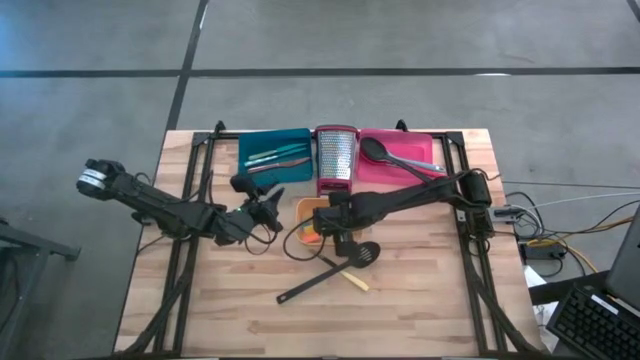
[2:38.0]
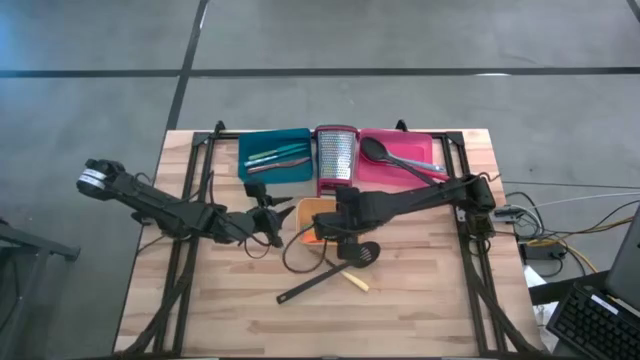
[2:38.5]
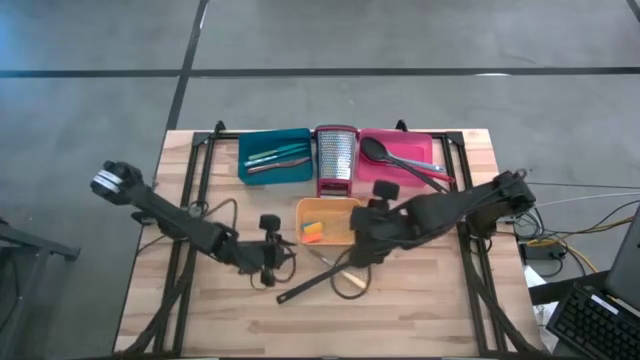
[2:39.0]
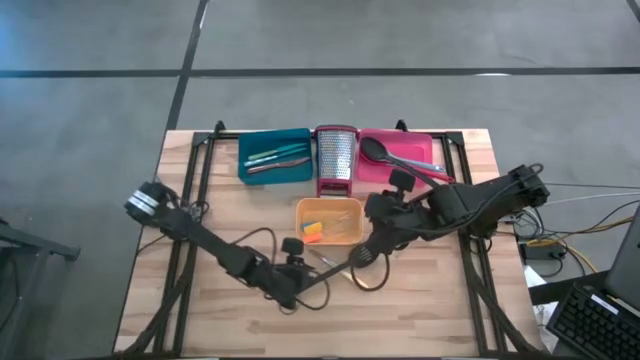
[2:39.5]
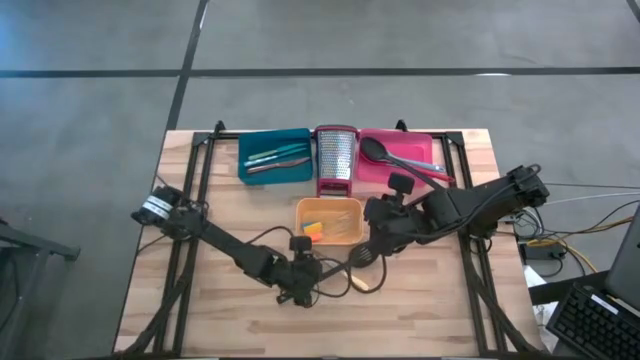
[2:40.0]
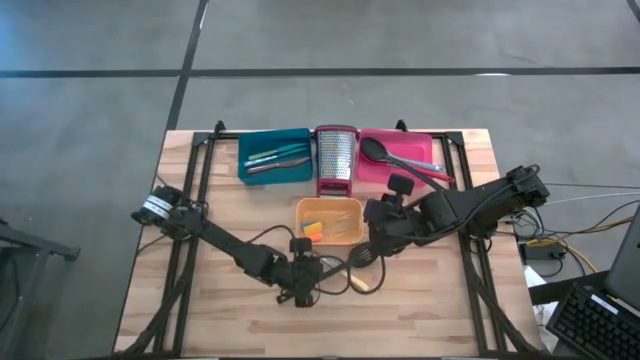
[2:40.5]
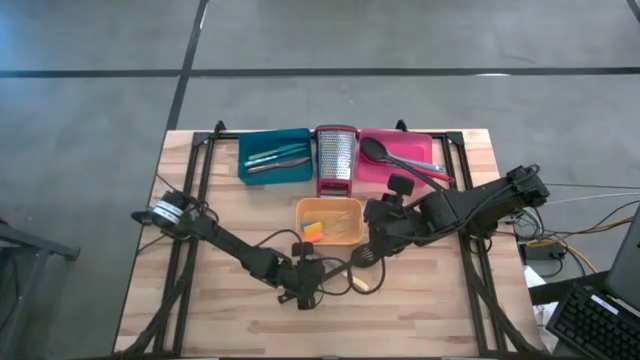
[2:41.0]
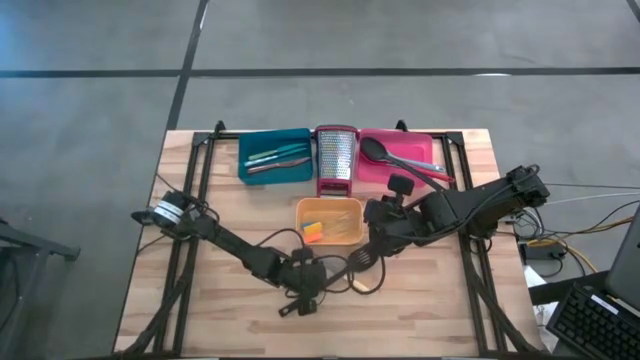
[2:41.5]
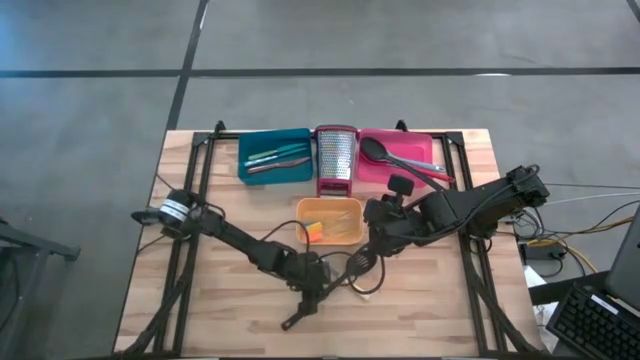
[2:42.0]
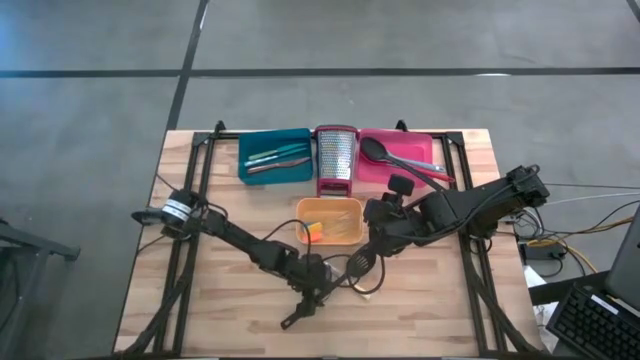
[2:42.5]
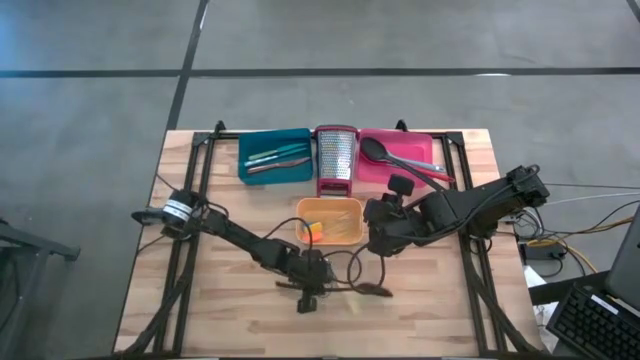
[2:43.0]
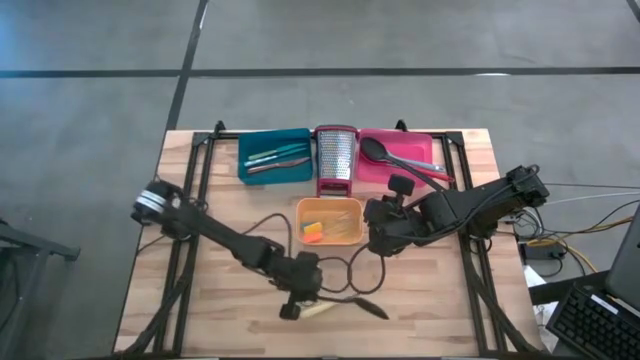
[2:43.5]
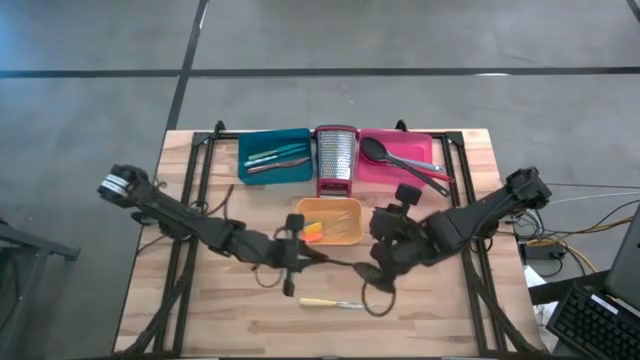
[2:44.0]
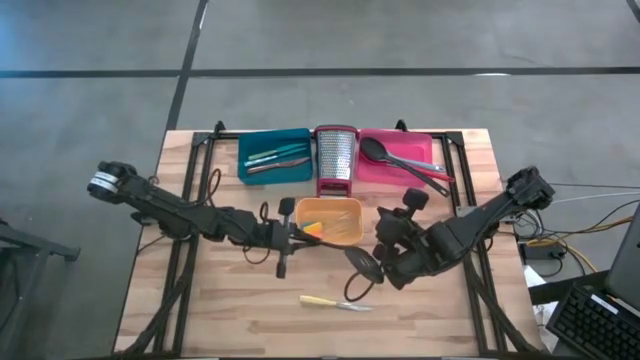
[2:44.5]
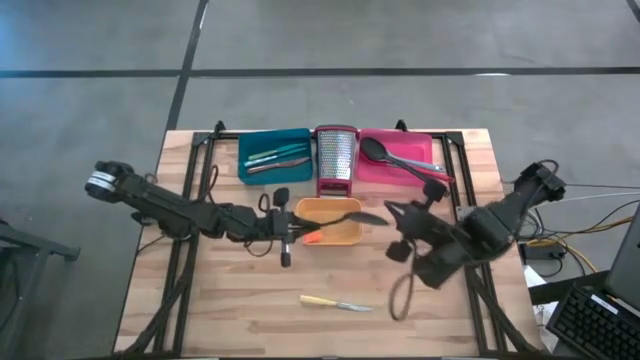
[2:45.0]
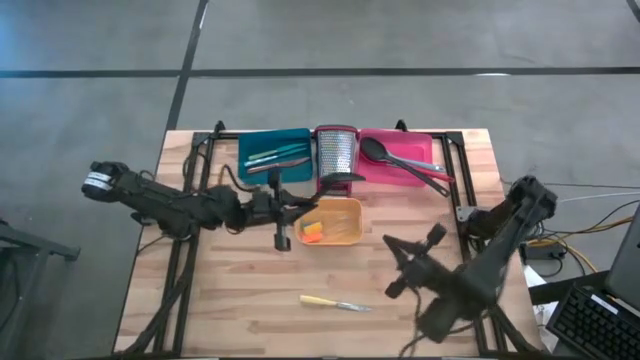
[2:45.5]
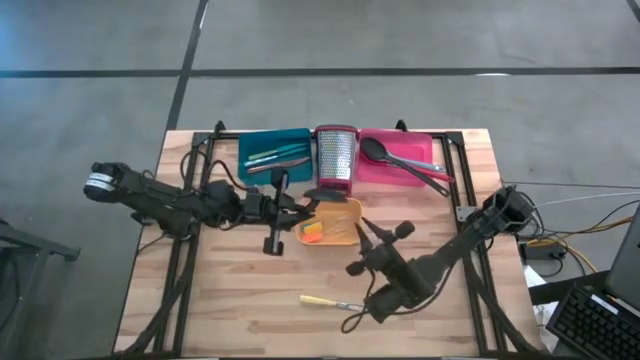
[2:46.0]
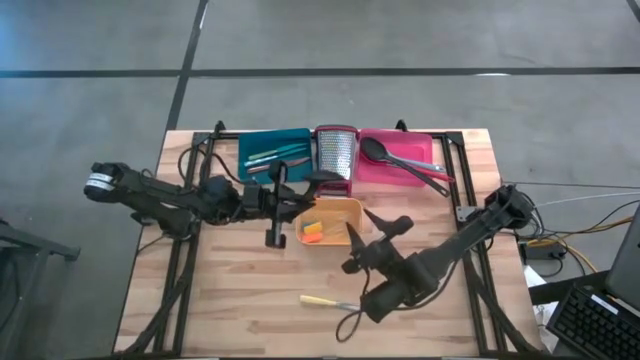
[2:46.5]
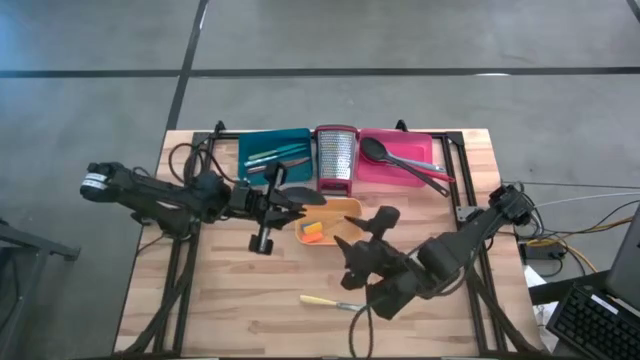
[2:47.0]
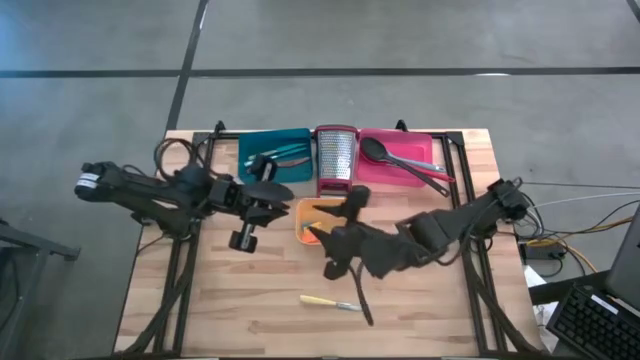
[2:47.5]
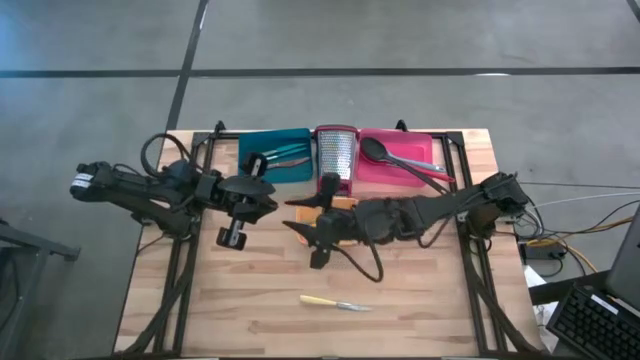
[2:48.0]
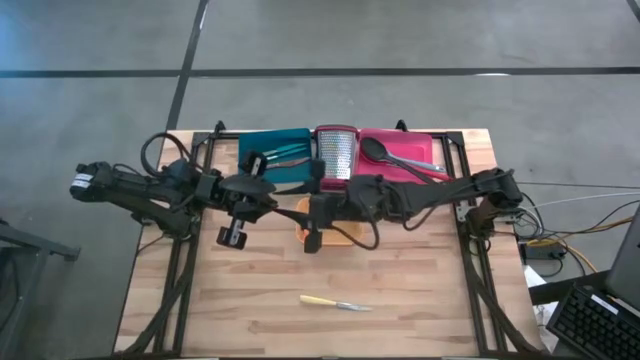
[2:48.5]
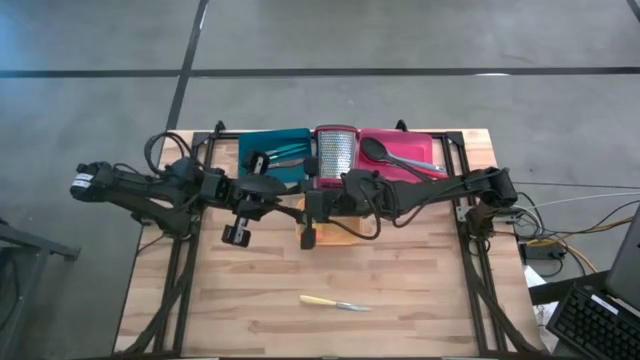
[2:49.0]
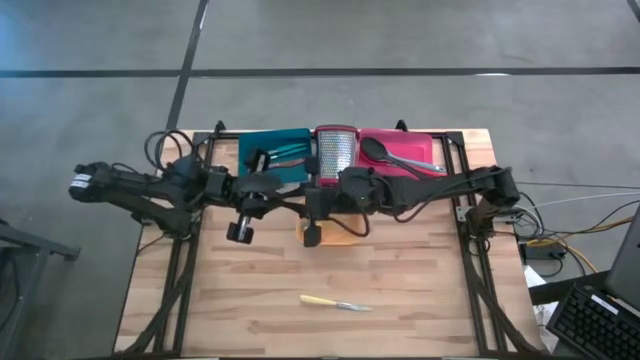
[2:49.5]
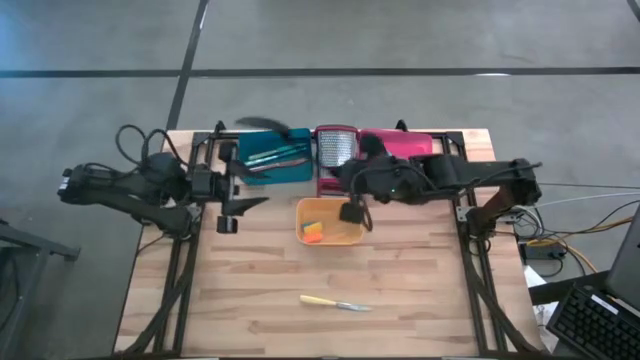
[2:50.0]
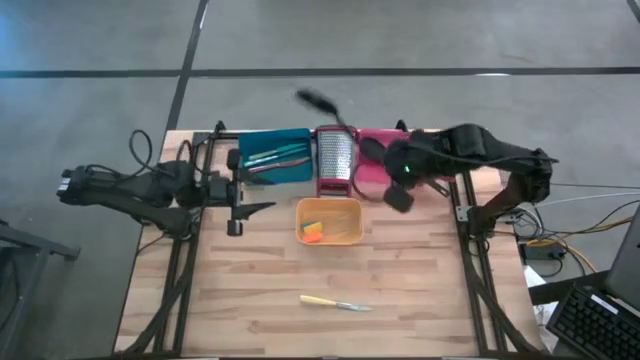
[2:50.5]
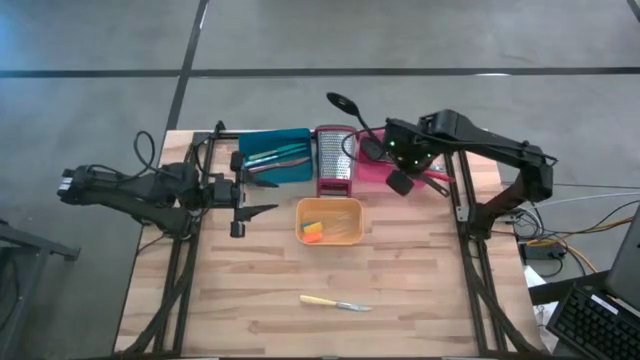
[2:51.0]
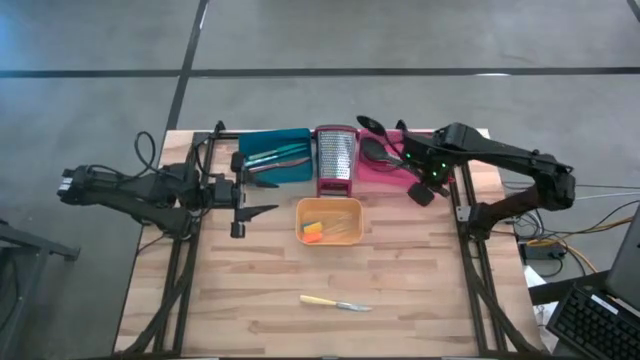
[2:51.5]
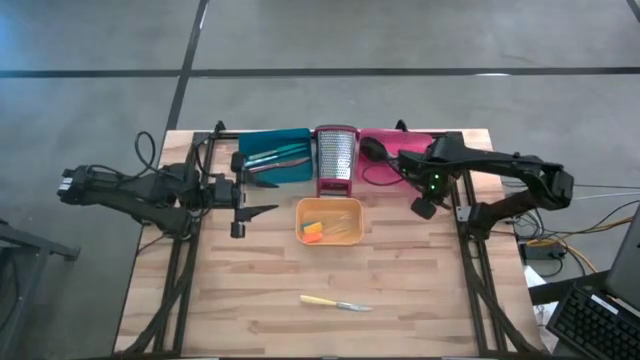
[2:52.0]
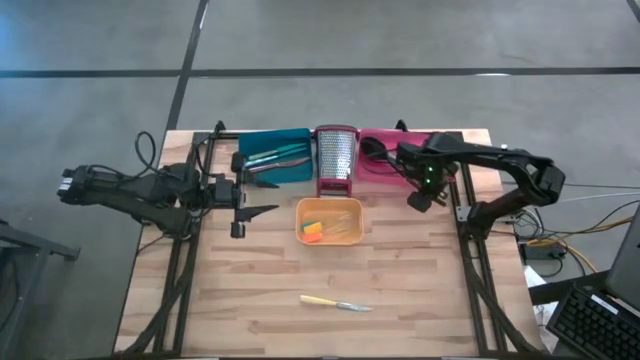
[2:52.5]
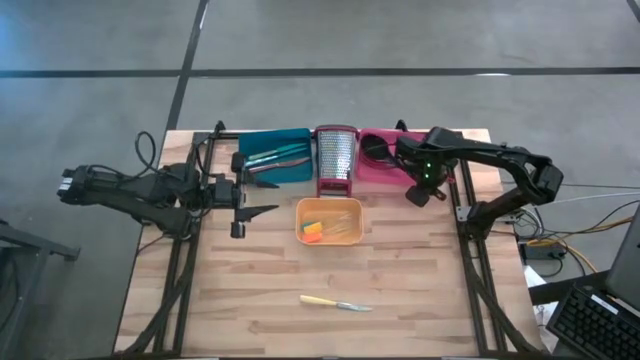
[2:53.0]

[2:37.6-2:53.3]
Task: Pick & Place Kitchen Items
Put the black serving spoon into the pink bin

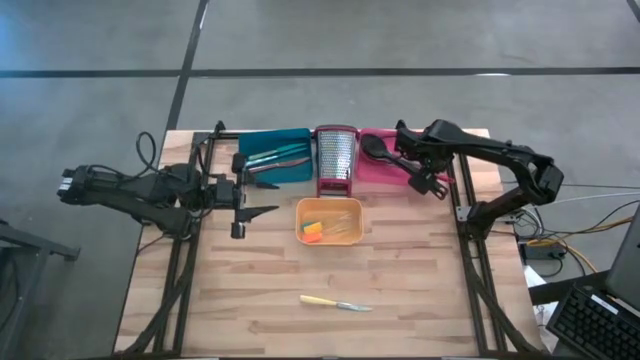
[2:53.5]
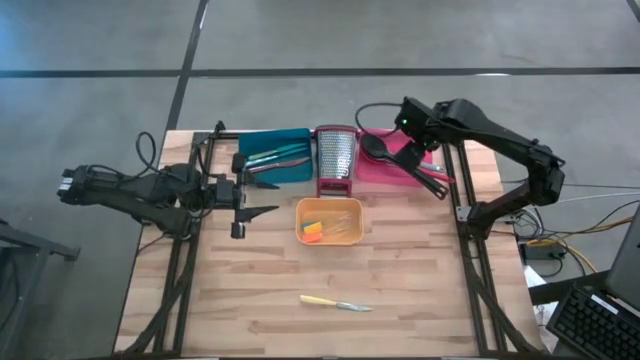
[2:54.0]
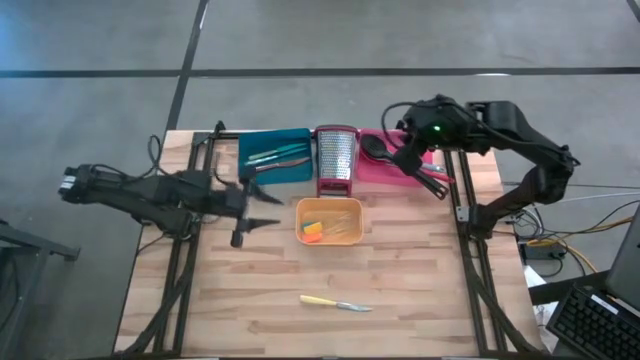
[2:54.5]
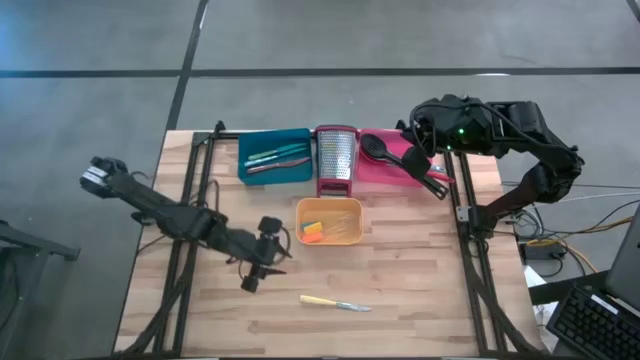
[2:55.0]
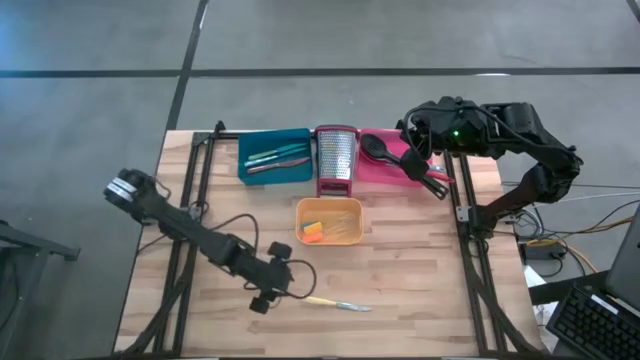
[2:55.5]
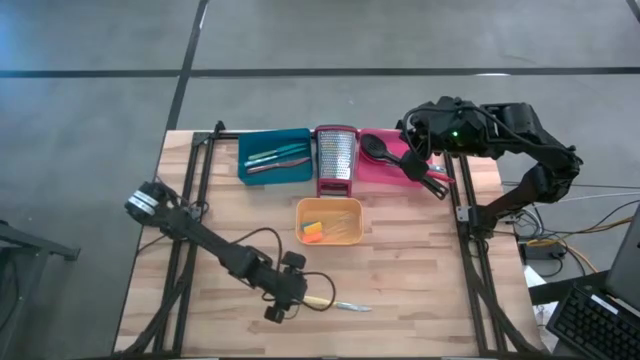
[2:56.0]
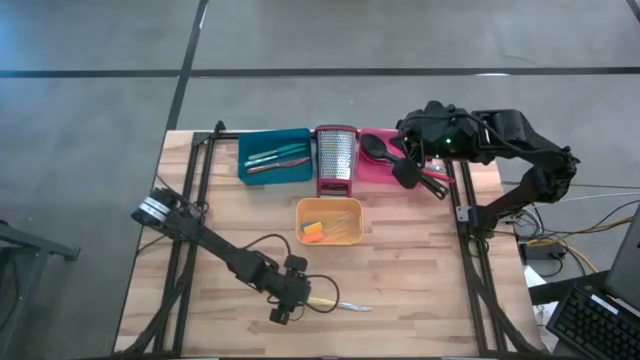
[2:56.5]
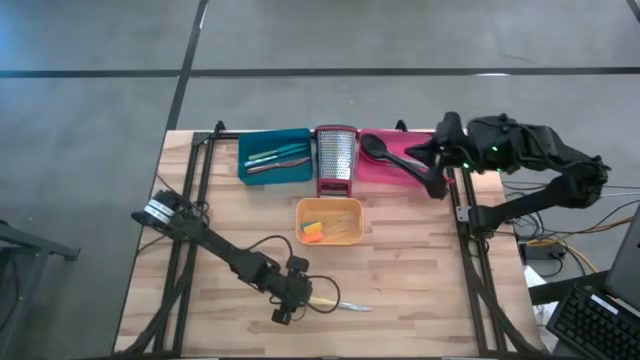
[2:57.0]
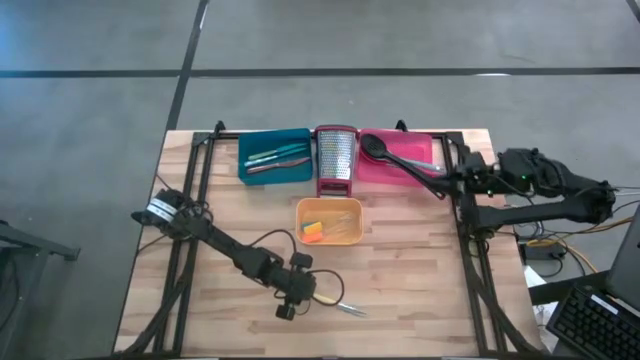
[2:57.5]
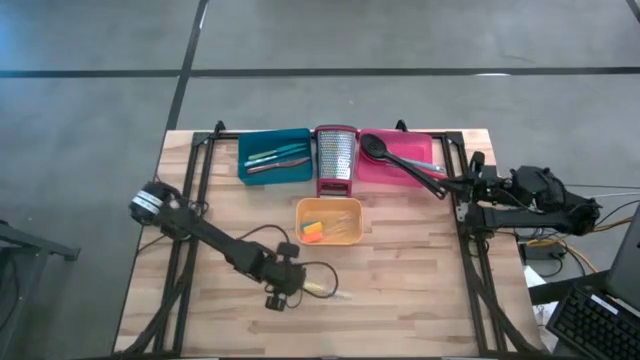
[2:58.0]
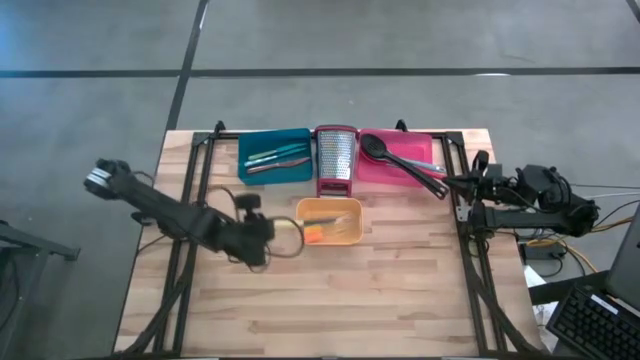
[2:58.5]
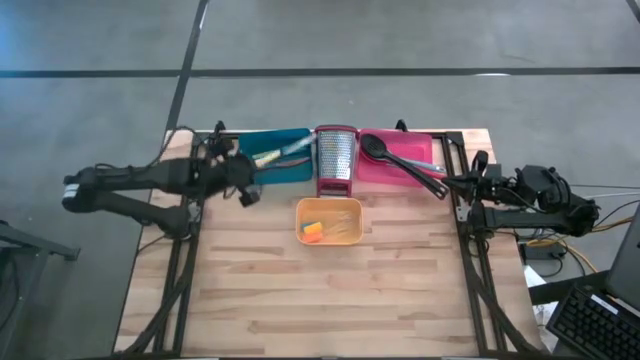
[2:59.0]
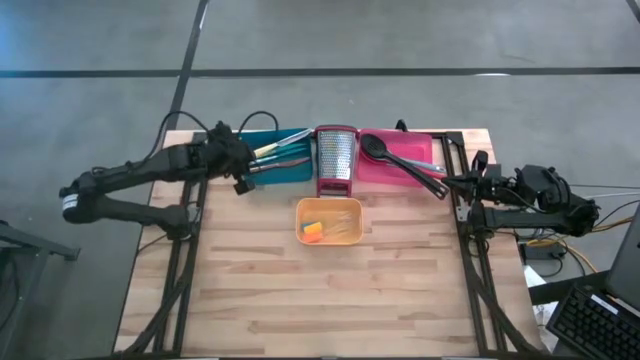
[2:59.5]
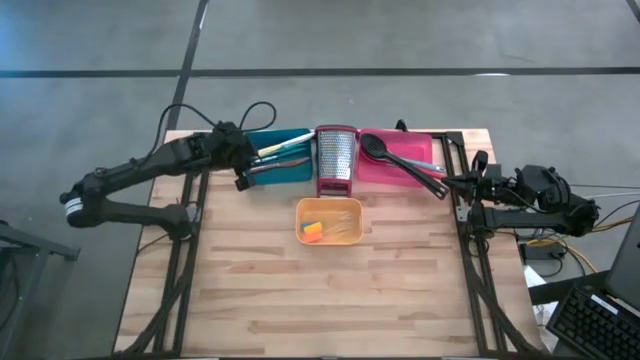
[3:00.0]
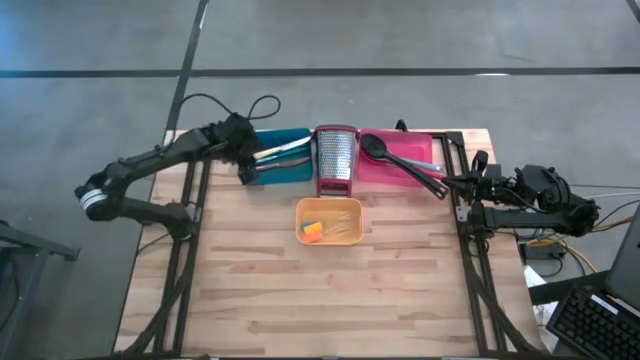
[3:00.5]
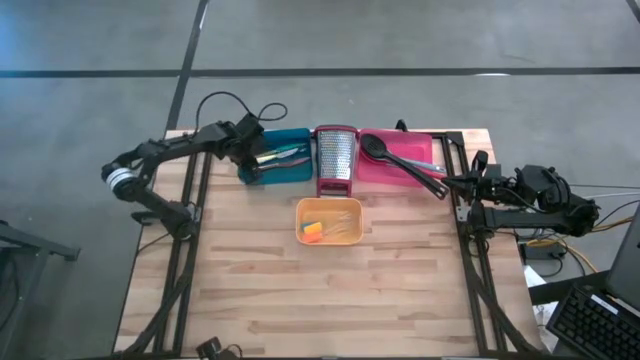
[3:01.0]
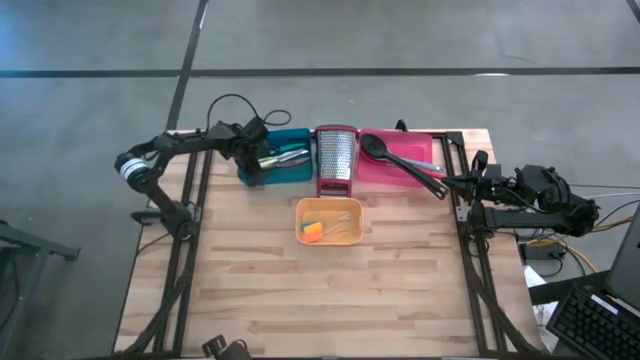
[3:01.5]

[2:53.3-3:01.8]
Put the yellow table knife into the blue bin
